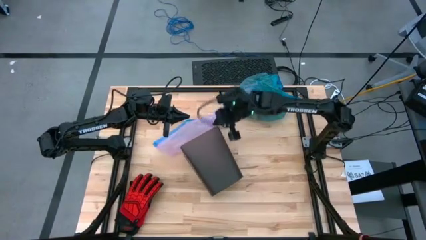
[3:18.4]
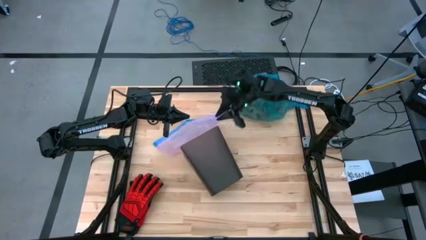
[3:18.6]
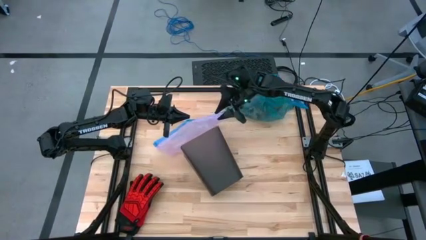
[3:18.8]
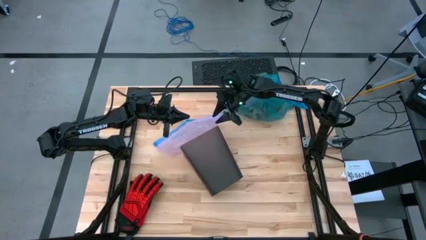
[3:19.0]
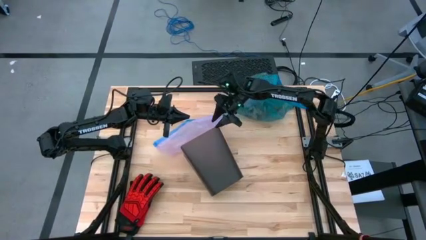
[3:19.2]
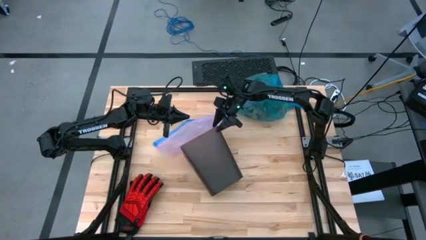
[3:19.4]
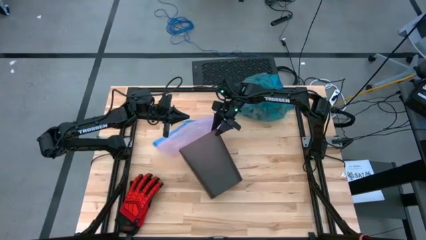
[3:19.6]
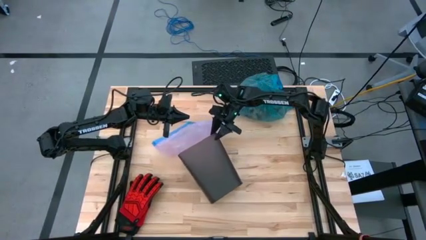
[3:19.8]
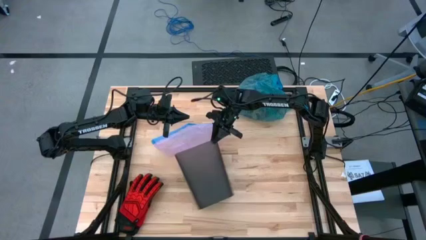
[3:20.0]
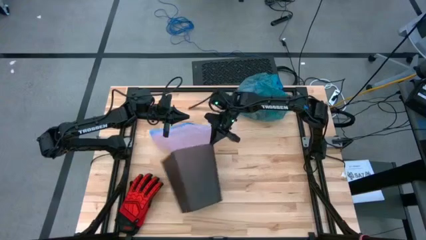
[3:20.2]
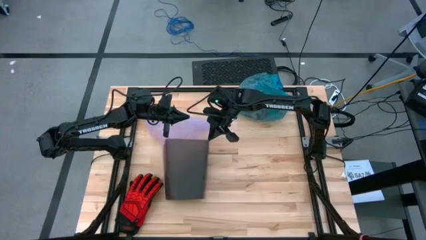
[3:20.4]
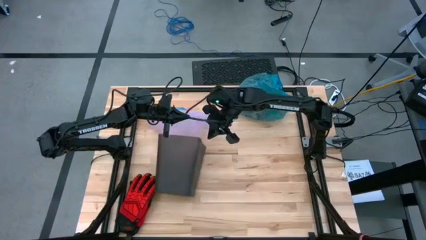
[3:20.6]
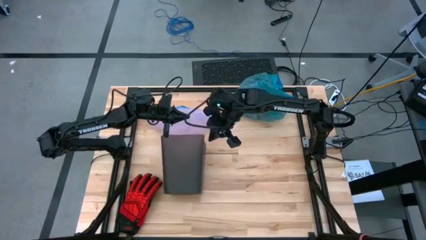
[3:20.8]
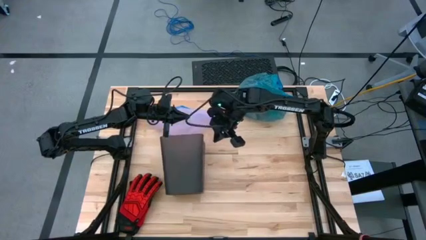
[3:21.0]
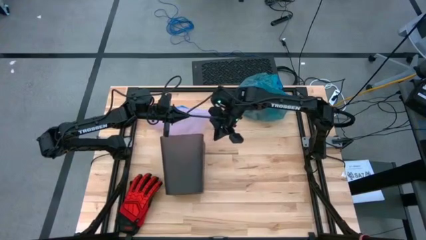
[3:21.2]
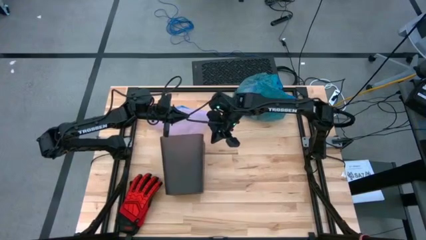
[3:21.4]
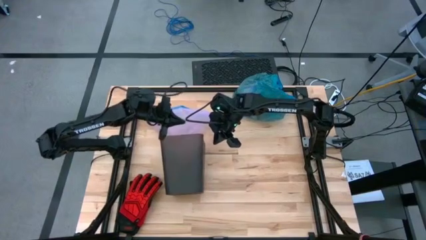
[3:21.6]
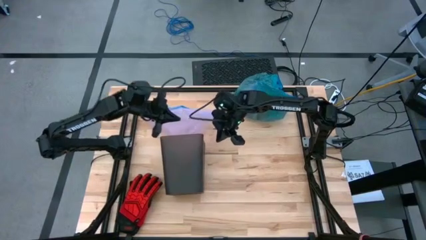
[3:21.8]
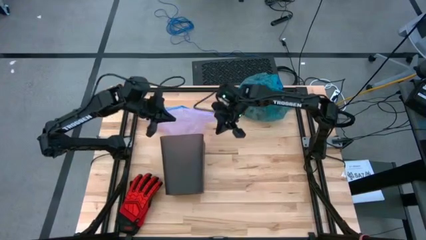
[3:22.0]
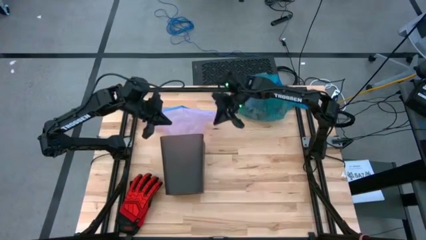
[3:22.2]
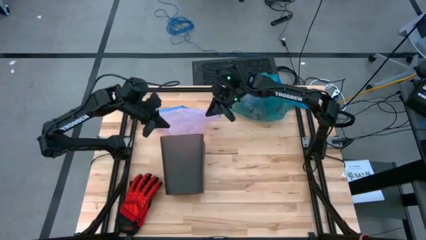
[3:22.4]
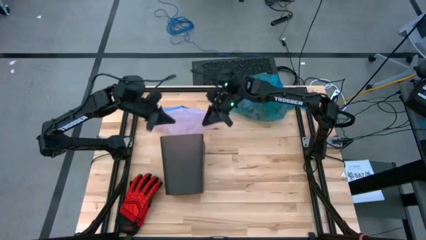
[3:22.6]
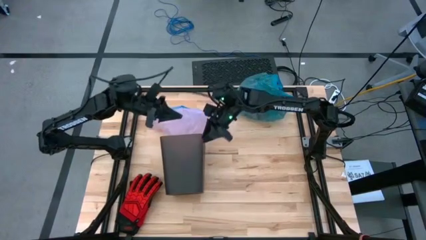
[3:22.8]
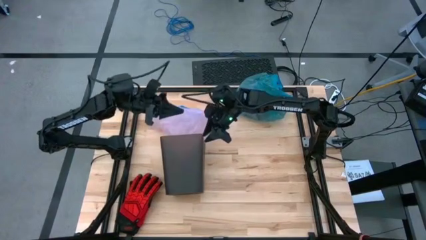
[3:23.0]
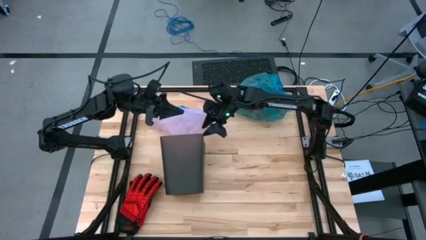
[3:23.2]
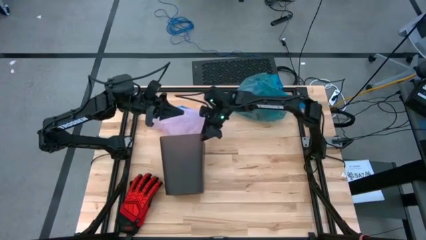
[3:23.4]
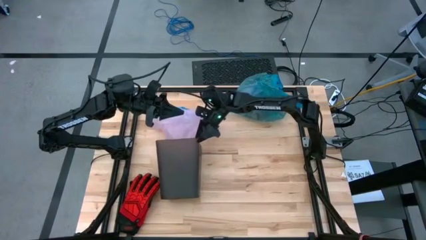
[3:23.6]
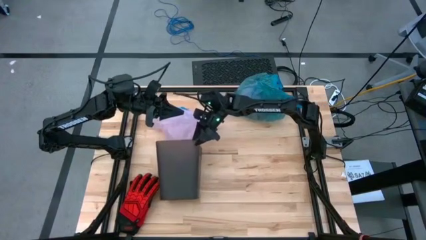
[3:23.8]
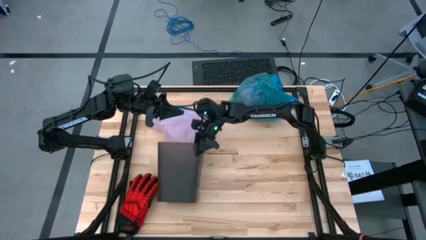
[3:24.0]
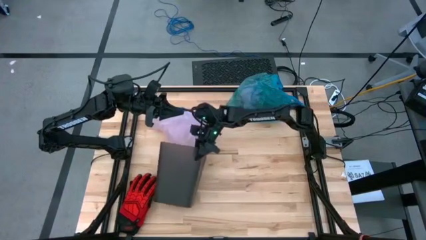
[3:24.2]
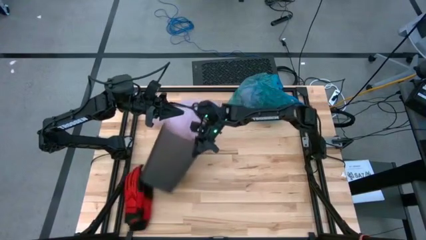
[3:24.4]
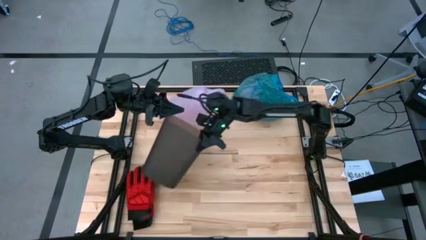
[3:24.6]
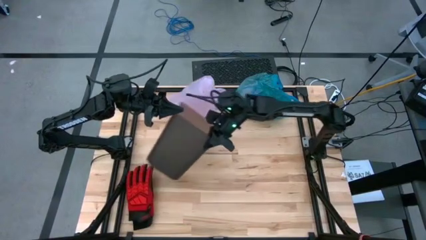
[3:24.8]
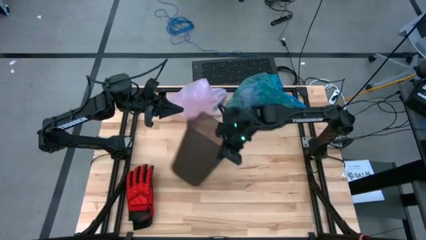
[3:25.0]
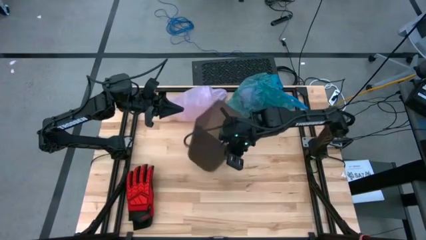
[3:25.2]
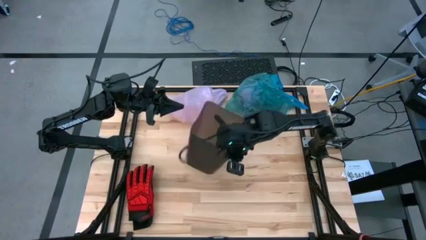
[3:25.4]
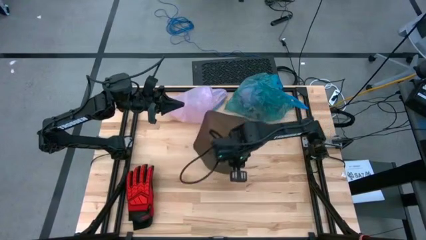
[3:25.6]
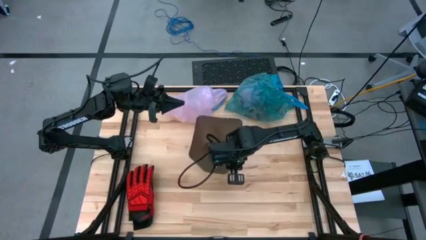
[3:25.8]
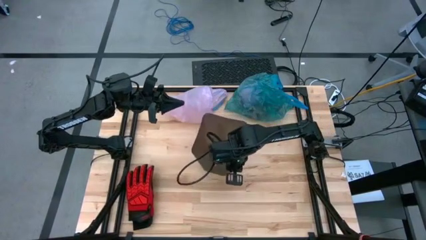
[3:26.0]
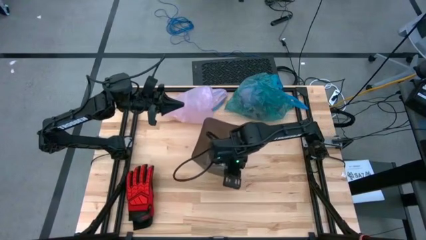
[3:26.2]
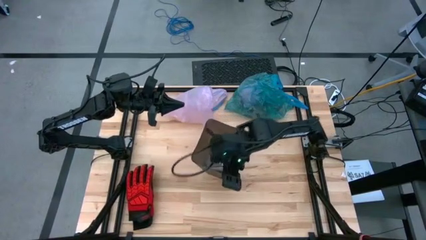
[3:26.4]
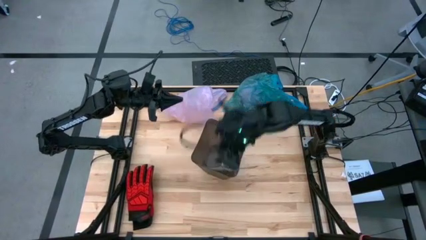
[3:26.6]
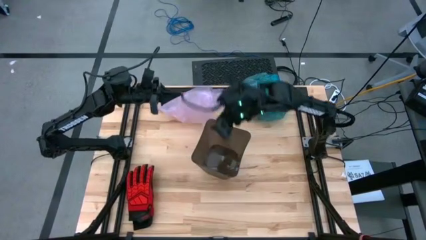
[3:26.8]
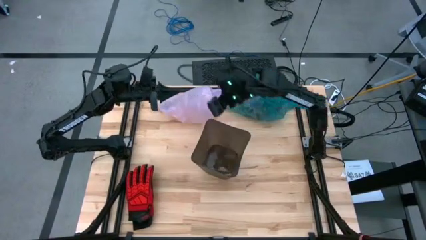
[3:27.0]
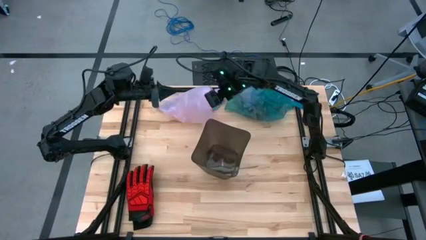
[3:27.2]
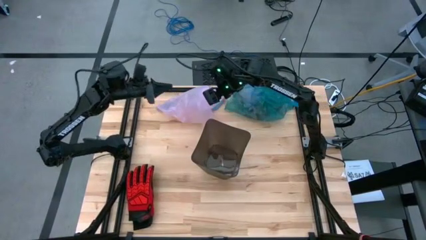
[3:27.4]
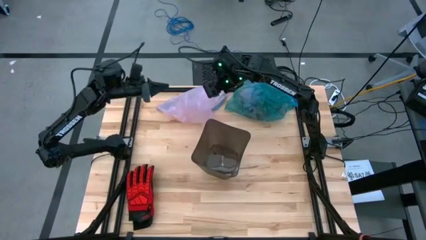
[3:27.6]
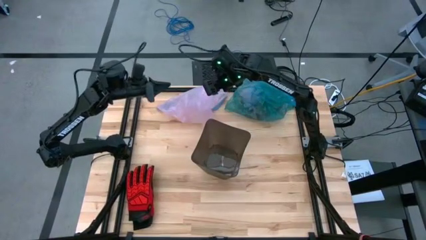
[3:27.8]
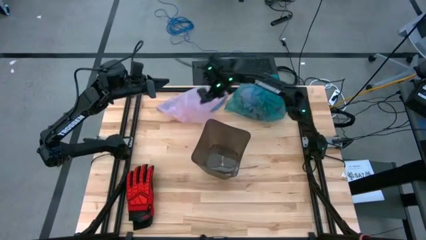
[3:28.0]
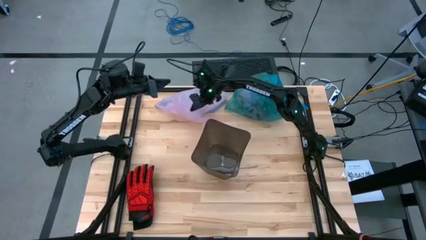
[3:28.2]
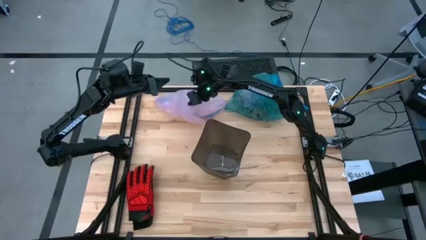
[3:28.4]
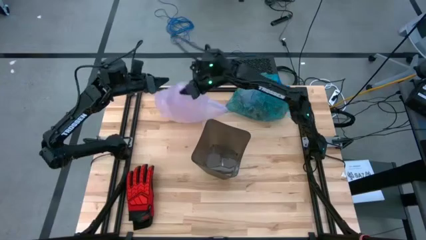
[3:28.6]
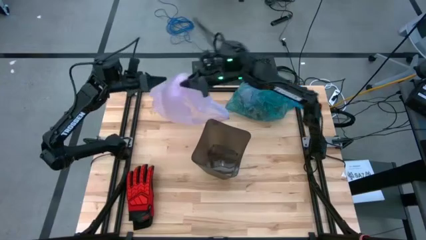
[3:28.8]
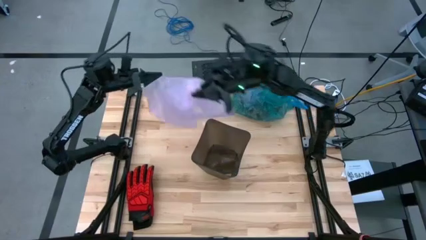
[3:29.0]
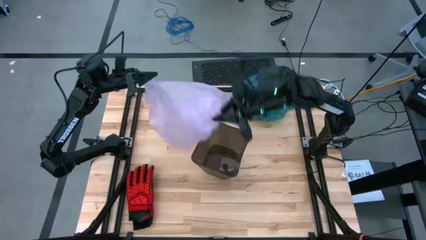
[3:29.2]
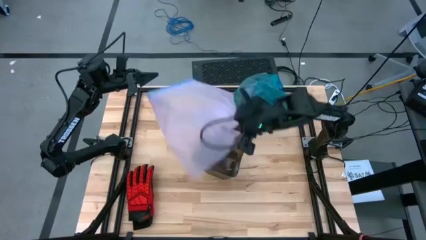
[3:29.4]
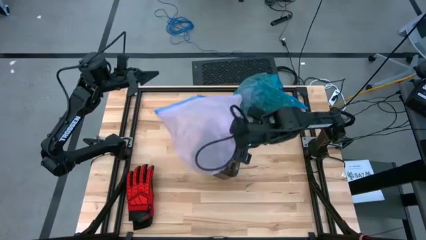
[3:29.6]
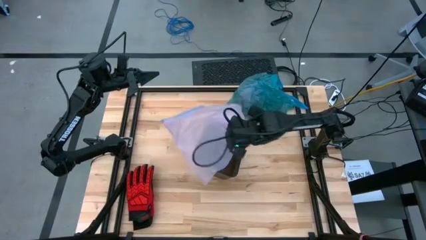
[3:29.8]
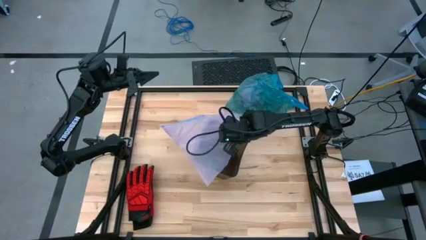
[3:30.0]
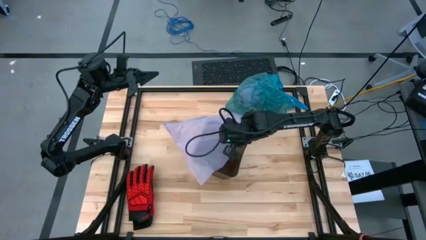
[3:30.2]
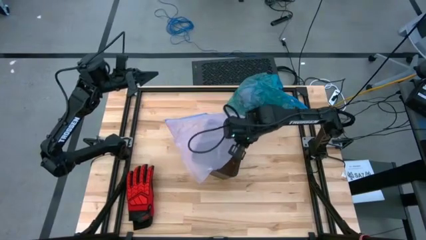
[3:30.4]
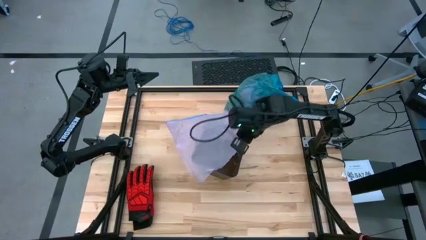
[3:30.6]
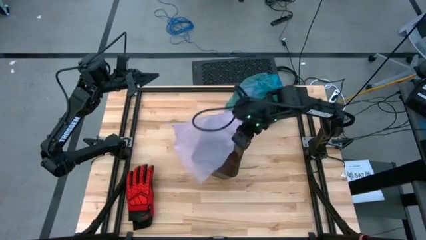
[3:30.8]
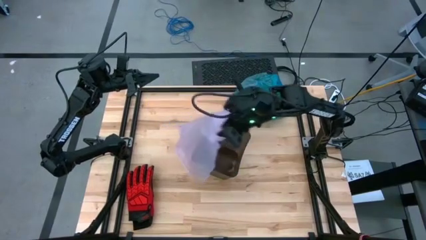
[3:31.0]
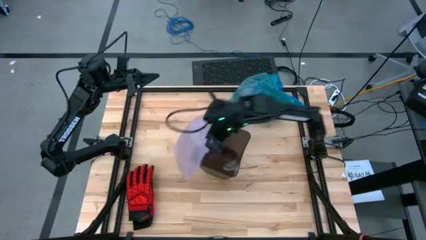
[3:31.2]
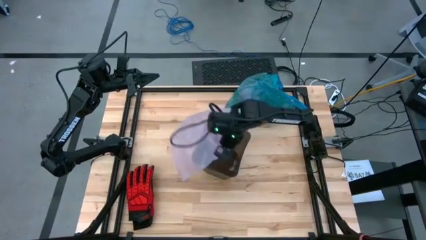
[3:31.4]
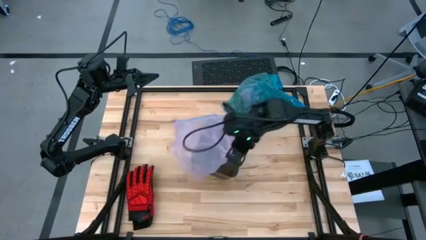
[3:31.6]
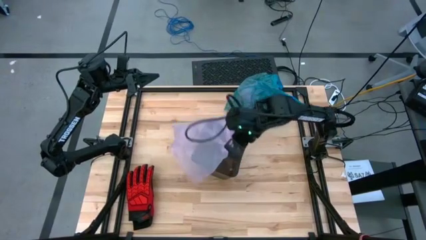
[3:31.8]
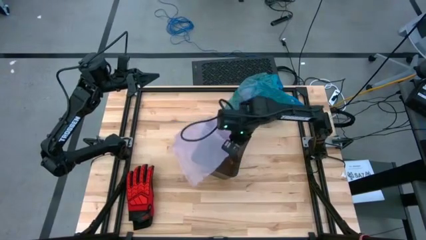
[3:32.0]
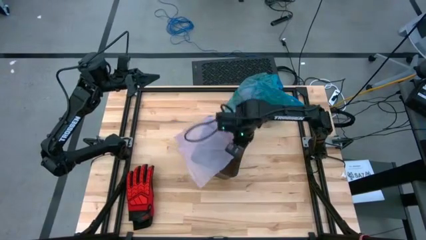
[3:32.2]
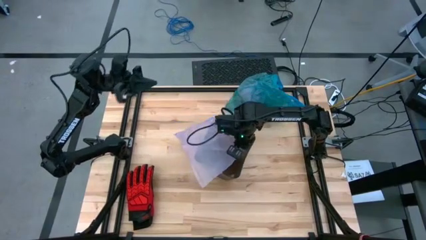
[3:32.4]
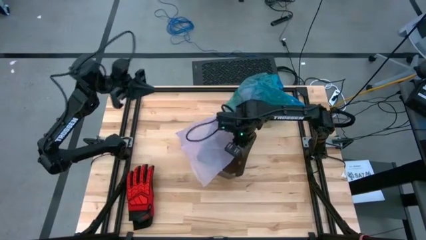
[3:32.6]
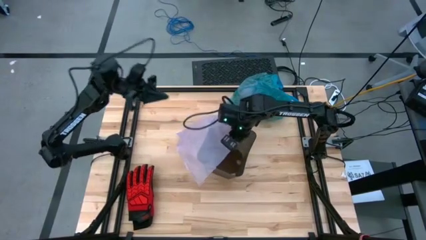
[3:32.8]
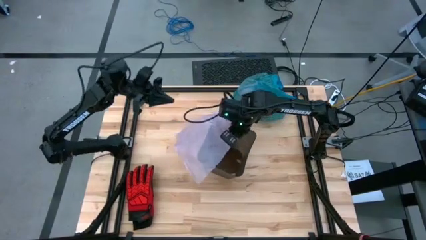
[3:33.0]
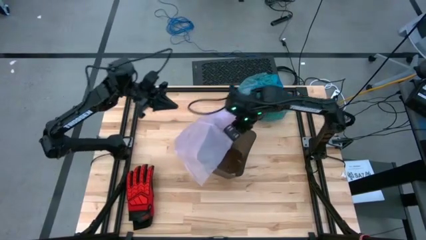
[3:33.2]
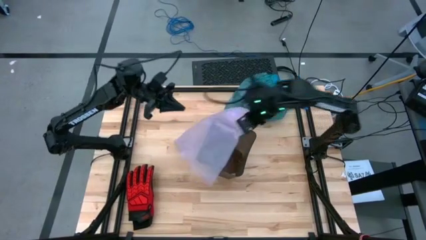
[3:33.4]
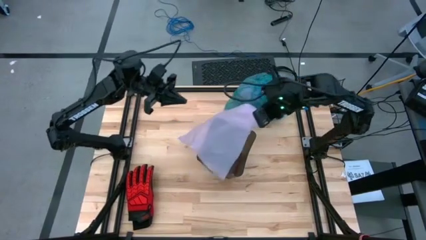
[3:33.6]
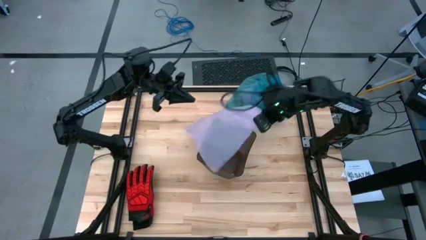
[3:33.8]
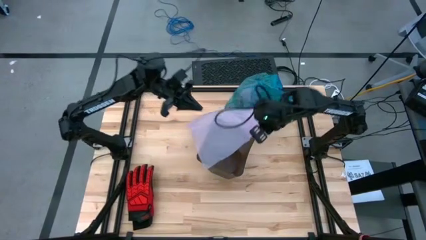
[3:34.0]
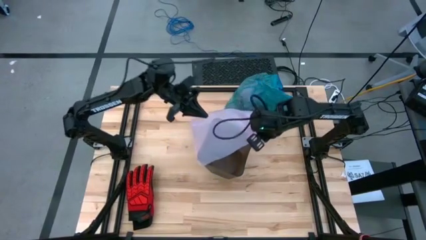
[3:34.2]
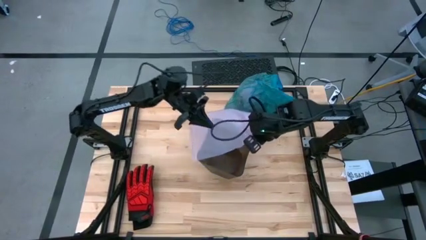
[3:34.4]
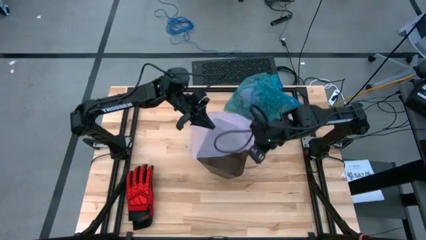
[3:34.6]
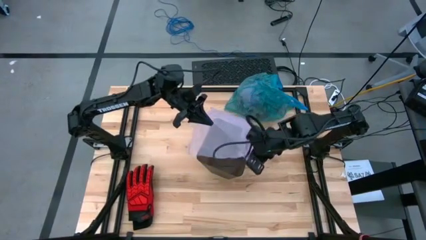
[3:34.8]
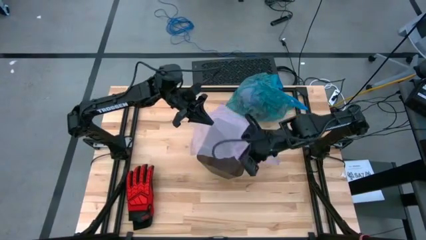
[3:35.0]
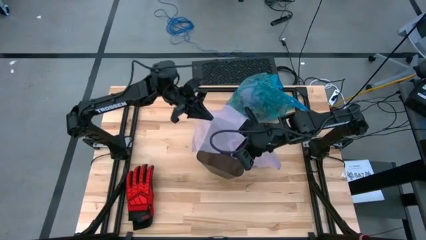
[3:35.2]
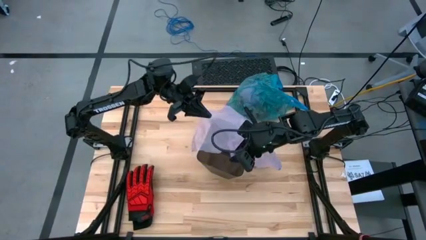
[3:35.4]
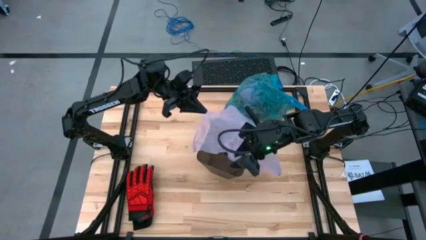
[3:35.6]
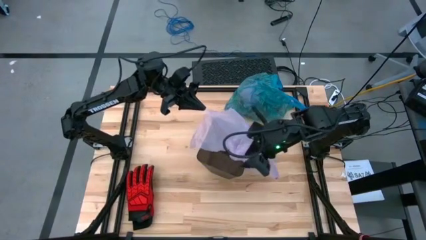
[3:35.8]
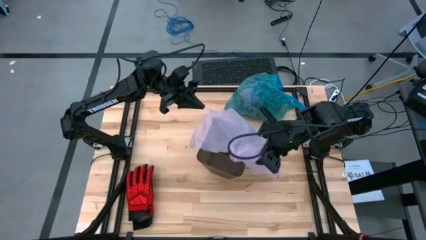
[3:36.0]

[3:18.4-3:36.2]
Task: place trash/remove bag and relplace
Put the pink trash bag into the trash bin
